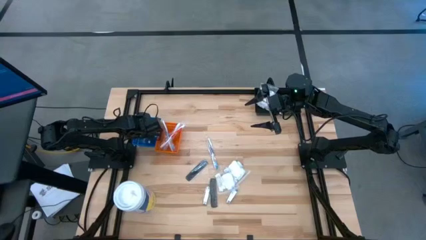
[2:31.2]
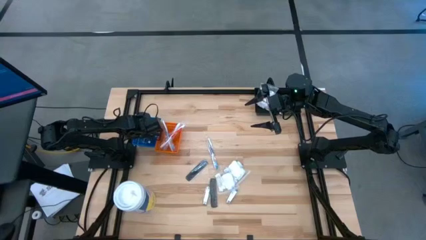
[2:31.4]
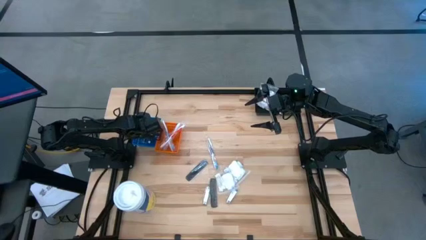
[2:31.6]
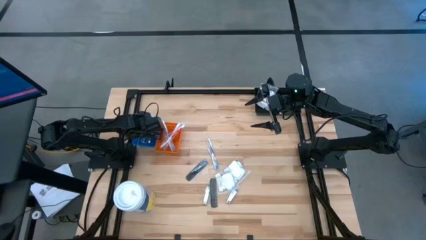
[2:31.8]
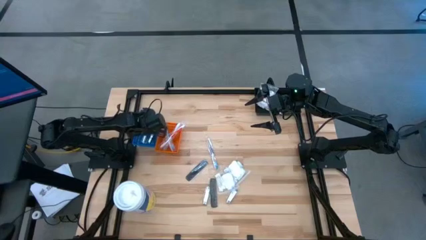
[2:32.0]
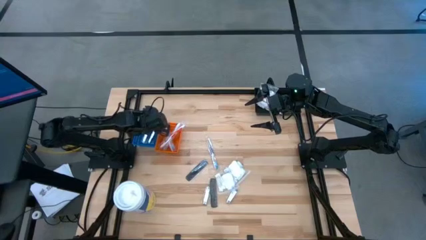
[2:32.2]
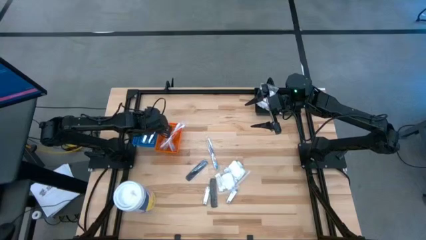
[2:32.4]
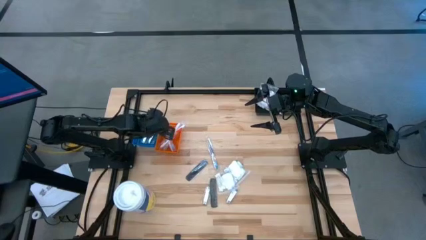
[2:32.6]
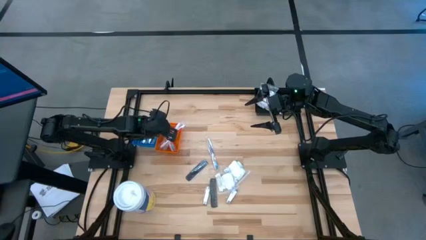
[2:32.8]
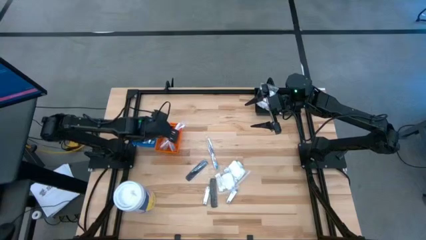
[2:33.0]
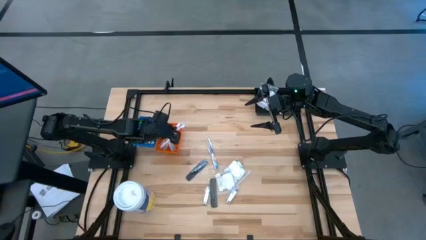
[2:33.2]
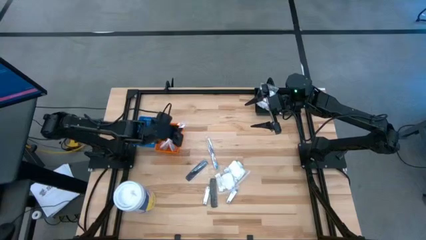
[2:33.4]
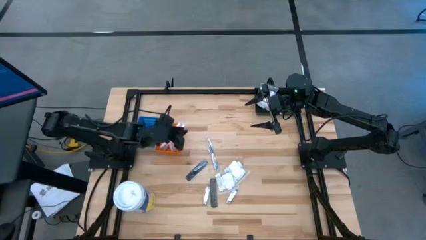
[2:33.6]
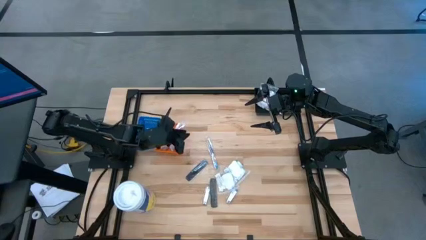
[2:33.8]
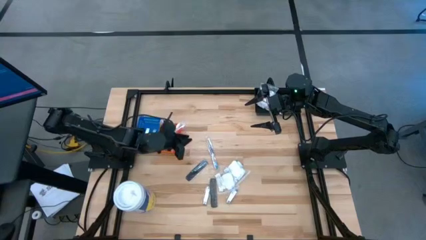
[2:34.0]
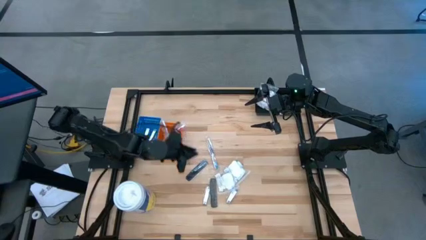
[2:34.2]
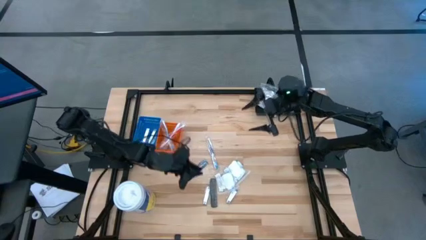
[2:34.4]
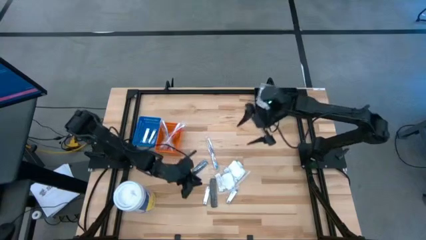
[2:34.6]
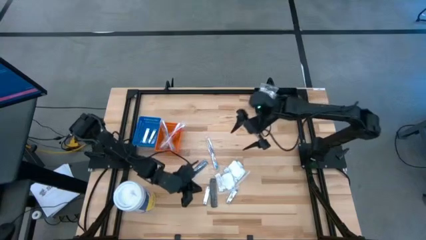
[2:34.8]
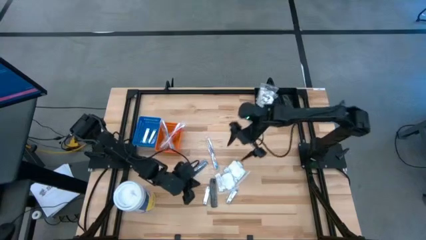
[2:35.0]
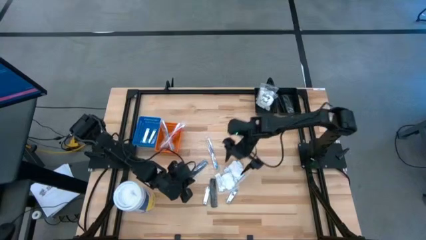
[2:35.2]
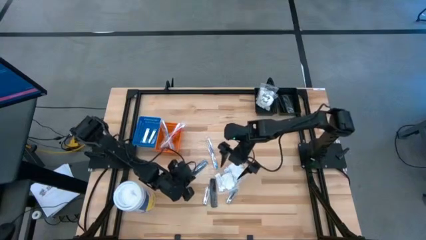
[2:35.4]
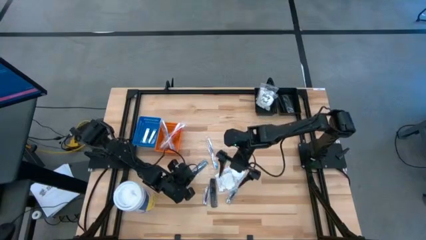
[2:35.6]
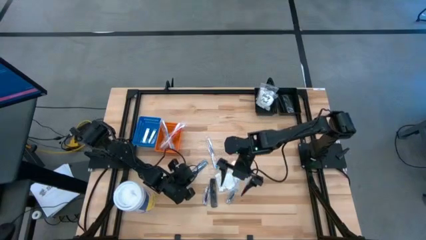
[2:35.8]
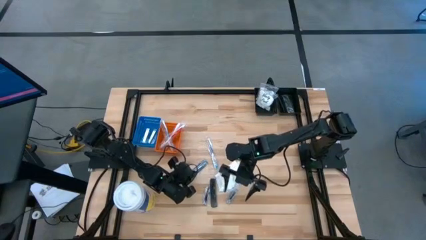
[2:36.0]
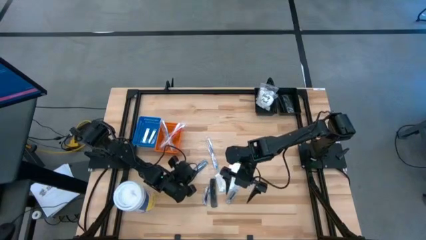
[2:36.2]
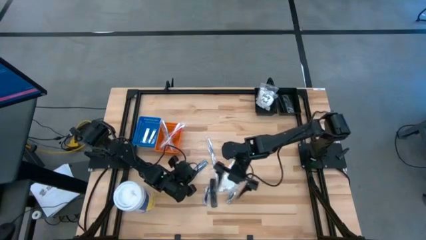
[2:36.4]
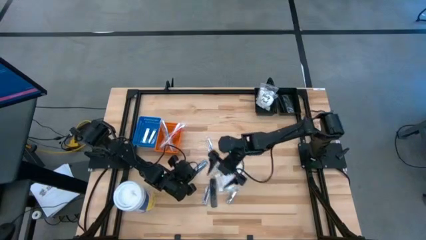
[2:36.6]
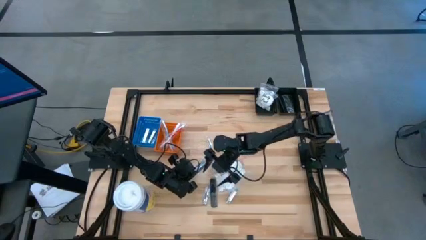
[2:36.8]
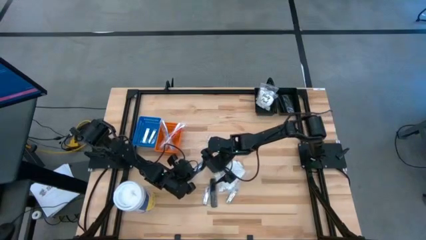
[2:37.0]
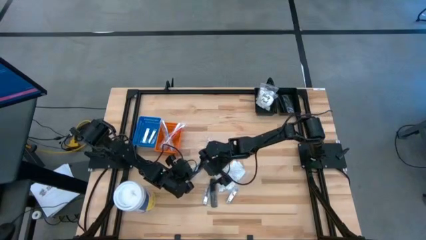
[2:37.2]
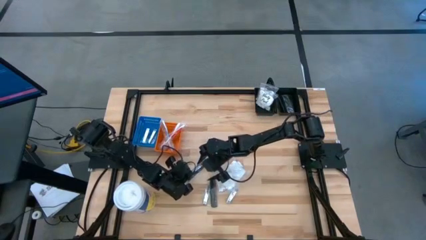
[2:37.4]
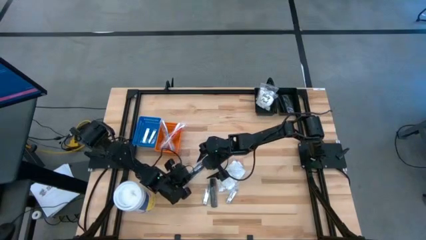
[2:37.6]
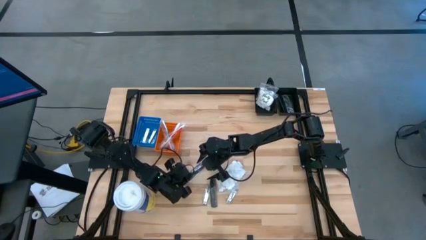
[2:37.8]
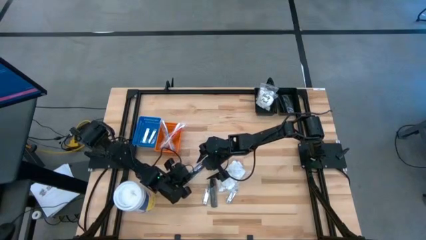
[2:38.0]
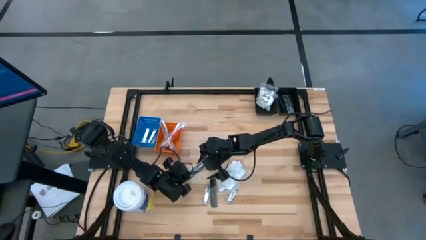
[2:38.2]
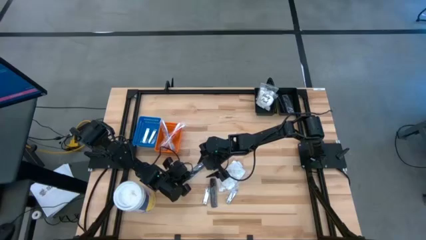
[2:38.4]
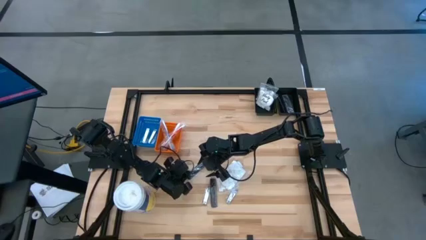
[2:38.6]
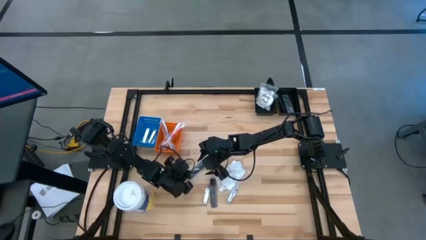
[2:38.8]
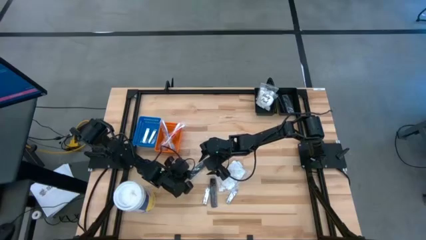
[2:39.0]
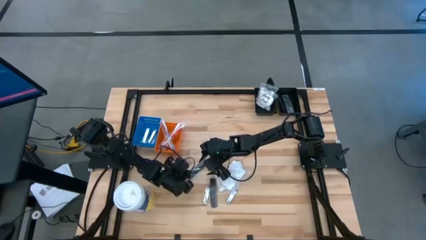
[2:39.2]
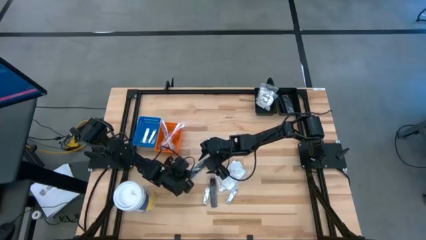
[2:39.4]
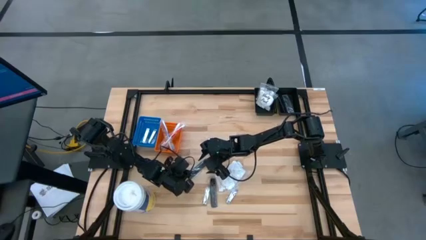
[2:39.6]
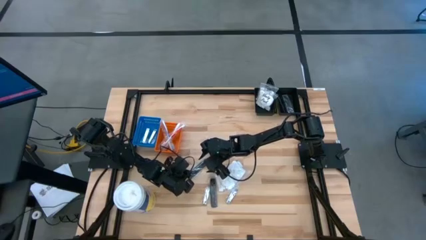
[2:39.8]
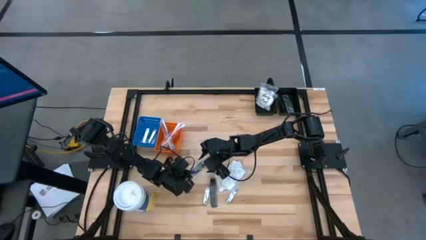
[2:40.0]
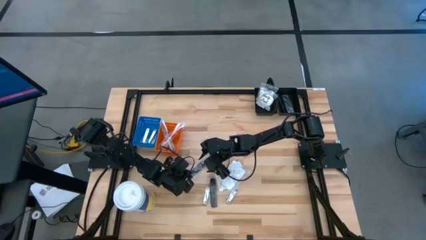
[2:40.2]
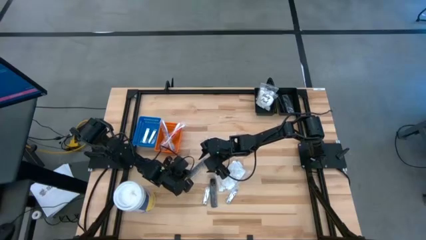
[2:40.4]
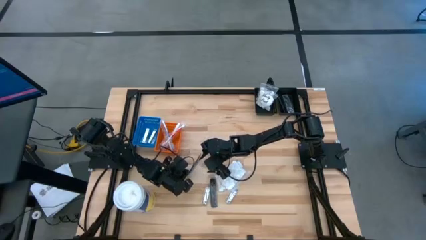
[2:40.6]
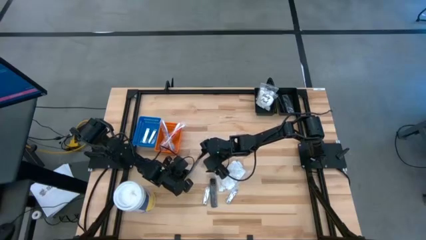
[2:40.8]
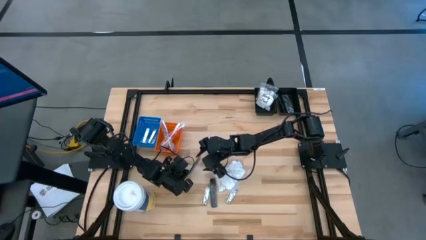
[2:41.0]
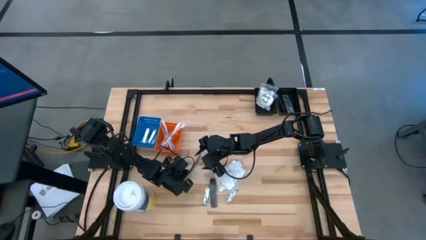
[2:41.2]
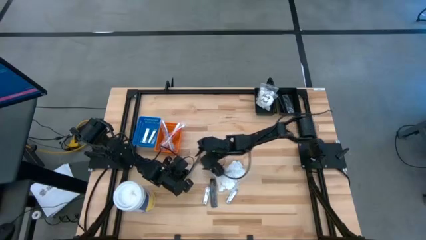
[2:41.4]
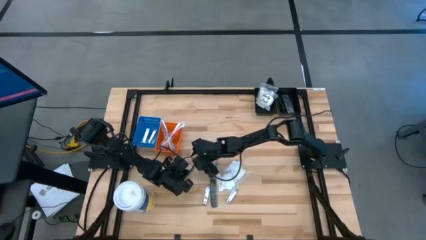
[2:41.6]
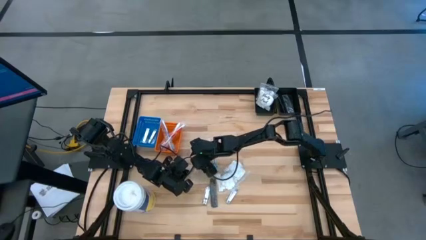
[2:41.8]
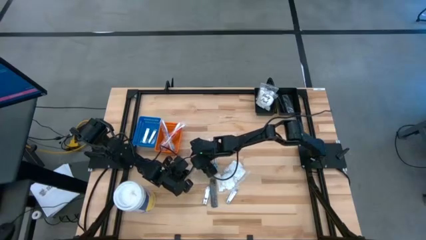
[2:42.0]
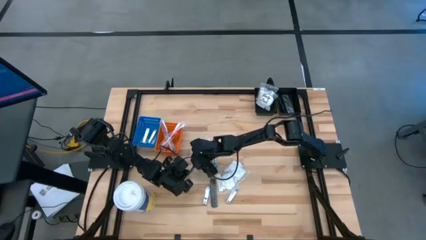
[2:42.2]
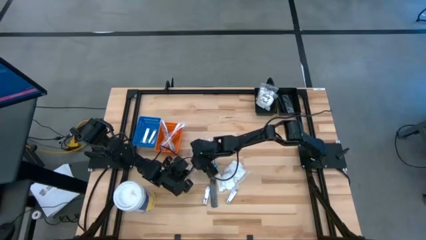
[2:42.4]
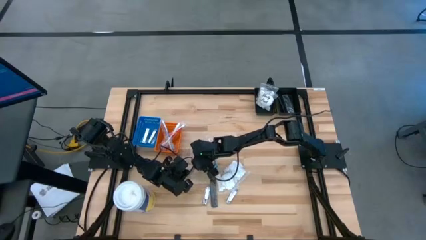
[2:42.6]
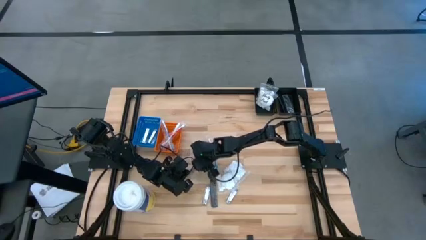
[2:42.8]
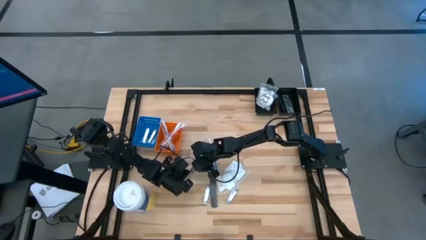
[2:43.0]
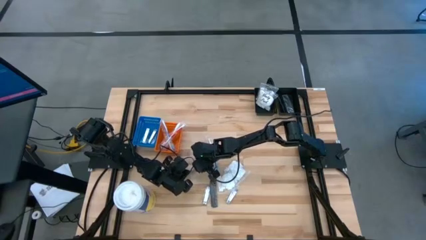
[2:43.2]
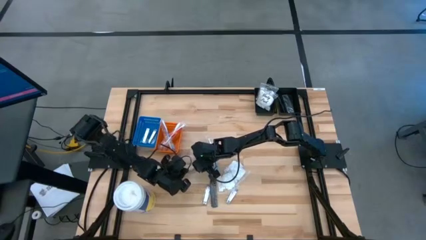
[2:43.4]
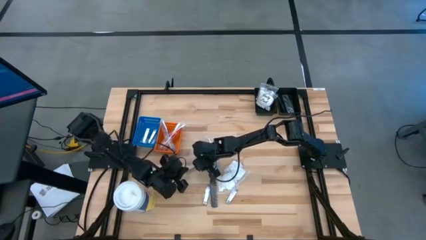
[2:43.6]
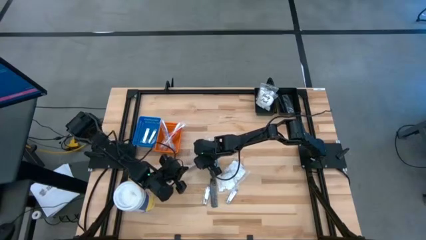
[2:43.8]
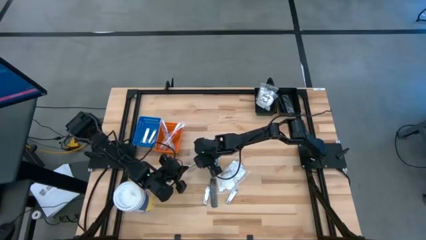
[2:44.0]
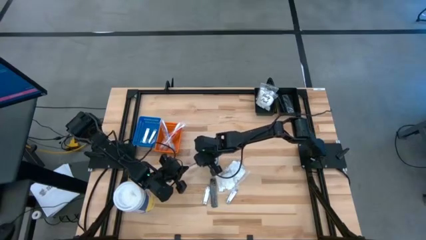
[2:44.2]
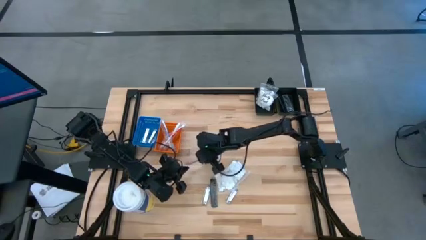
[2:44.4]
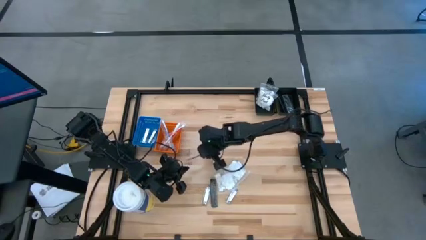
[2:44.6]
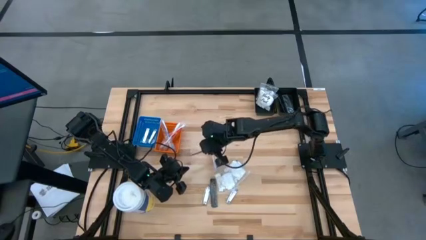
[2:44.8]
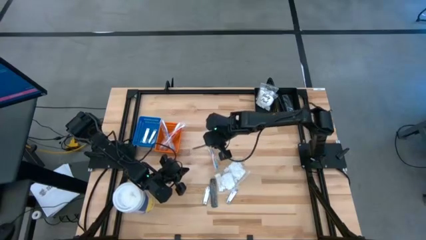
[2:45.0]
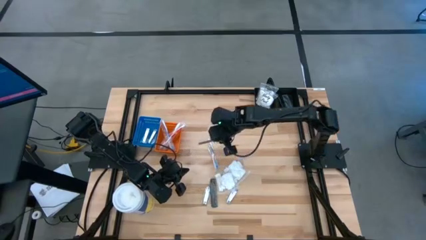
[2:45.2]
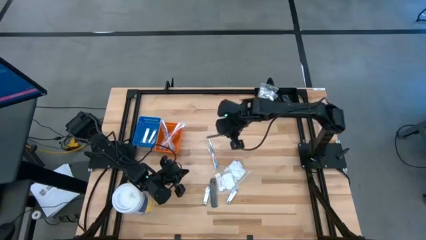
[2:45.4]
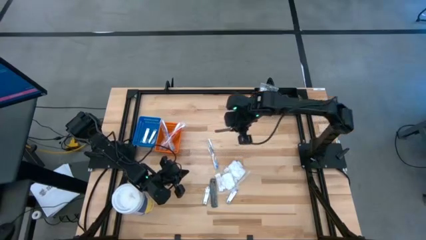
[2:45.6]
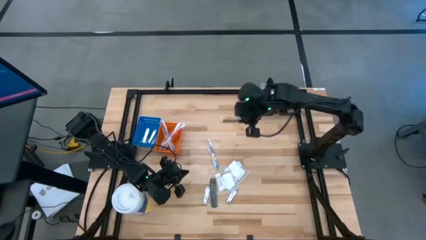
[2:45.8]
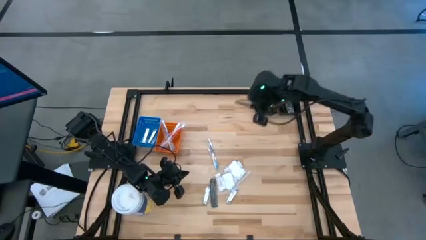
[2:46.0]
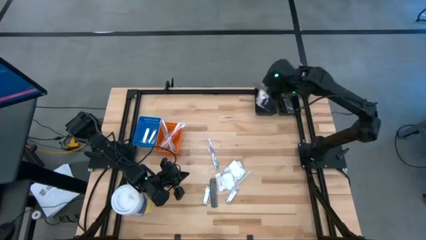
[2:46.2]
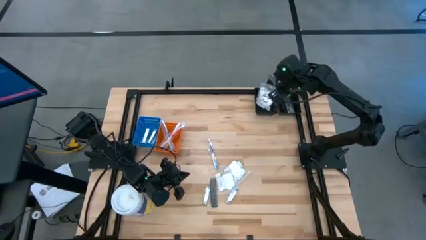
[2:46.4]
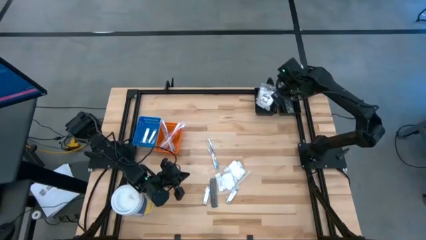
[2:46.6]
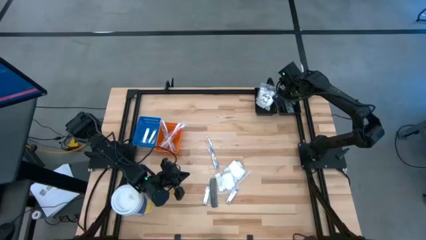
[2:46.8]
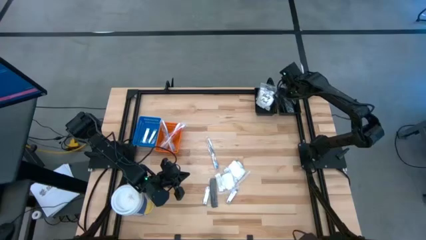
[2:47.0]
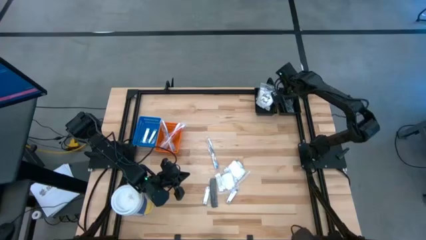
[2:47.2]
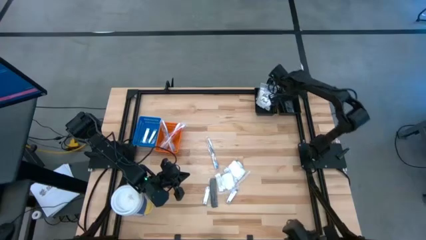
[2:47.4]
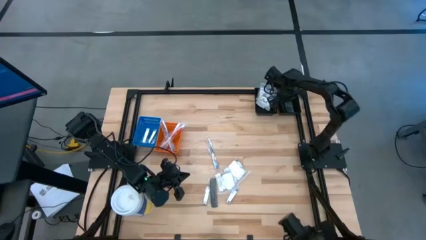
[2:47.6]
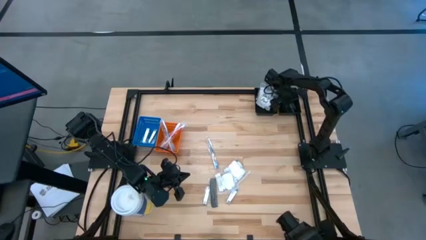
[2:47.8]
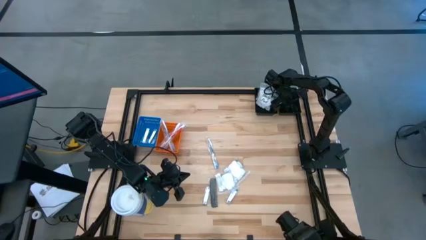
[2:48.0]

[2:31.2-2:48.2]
Task: Pick & Place Travel size toiletries
Put the black comb into the right black bin
